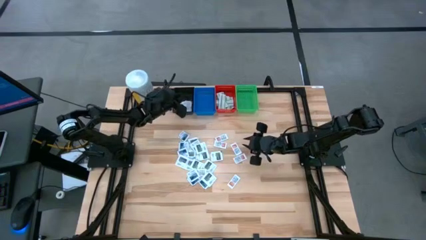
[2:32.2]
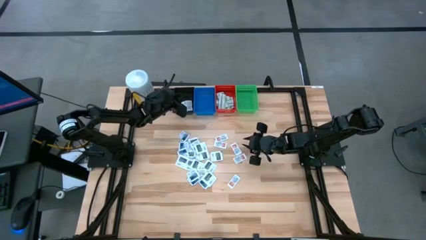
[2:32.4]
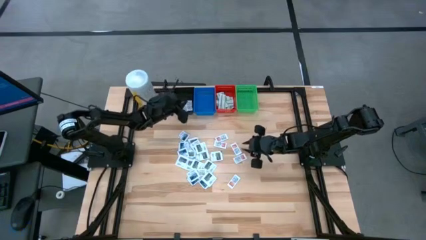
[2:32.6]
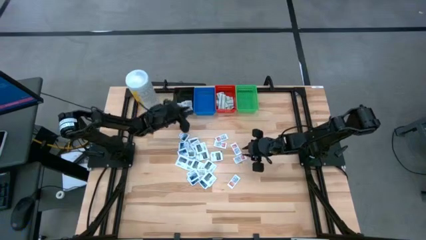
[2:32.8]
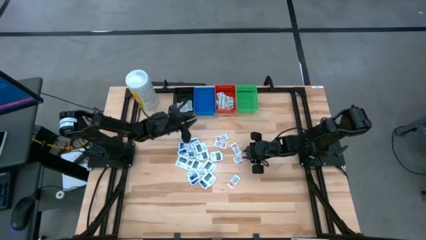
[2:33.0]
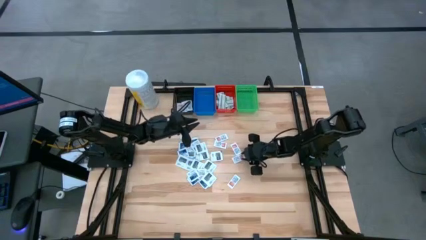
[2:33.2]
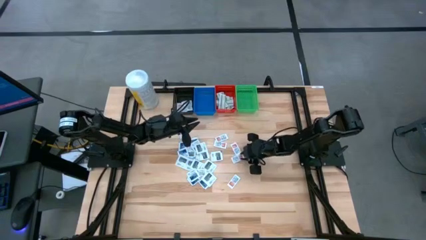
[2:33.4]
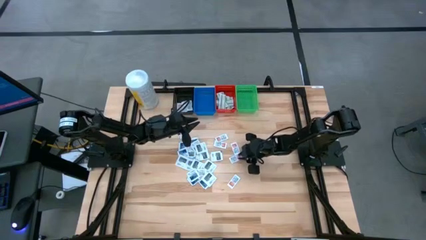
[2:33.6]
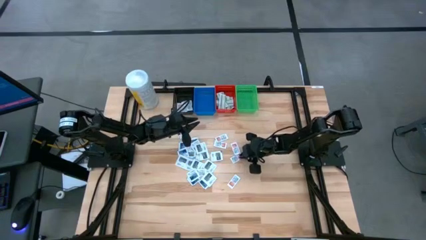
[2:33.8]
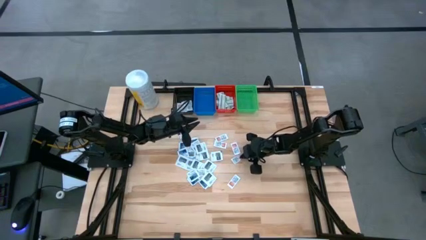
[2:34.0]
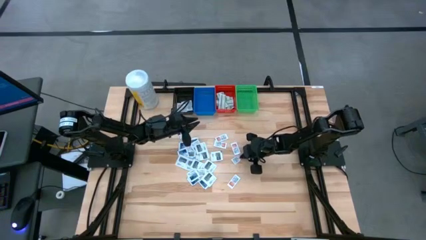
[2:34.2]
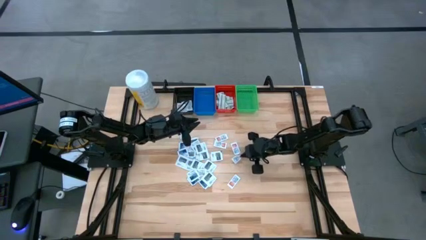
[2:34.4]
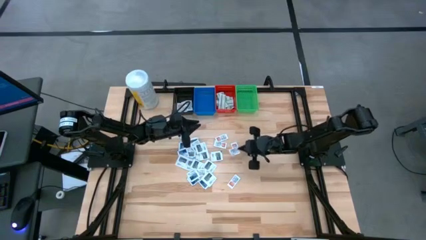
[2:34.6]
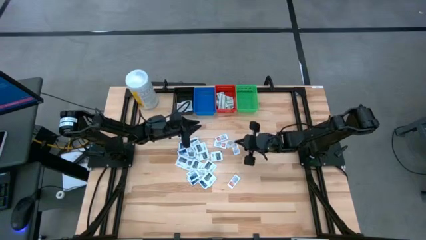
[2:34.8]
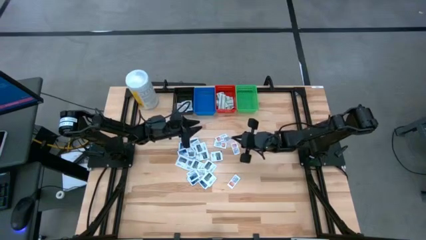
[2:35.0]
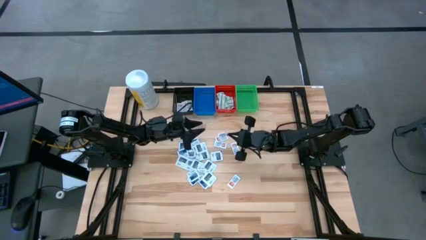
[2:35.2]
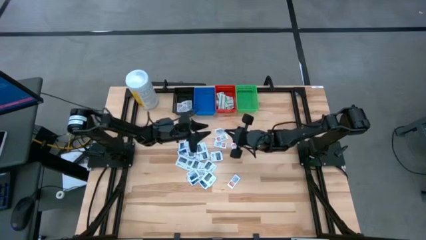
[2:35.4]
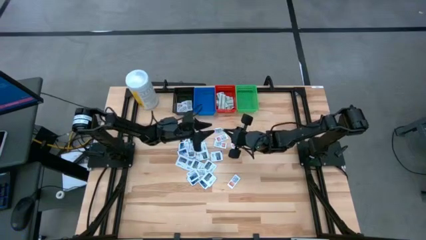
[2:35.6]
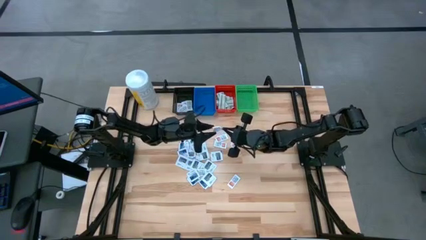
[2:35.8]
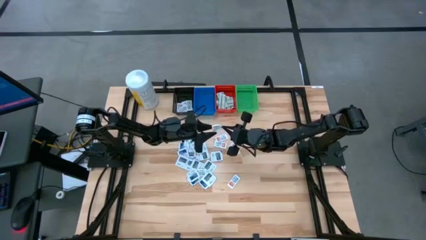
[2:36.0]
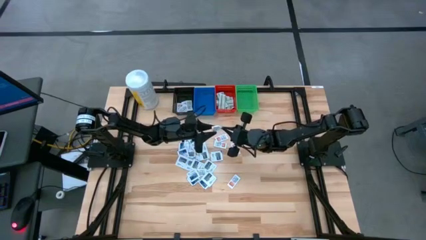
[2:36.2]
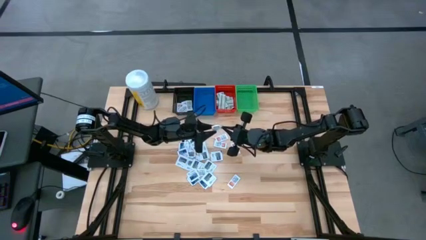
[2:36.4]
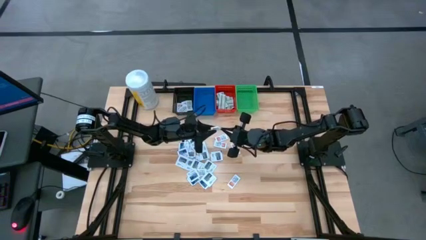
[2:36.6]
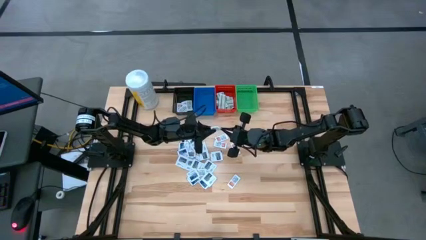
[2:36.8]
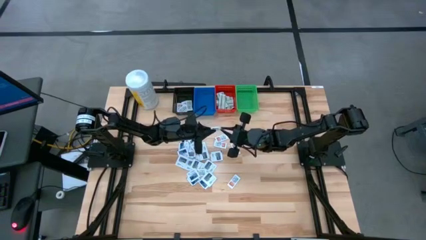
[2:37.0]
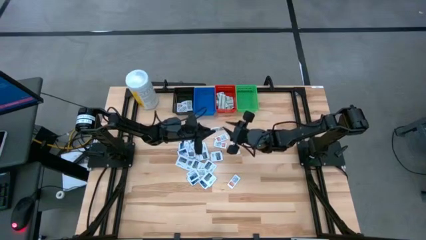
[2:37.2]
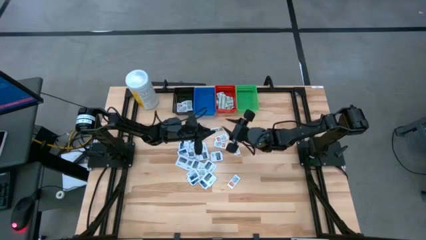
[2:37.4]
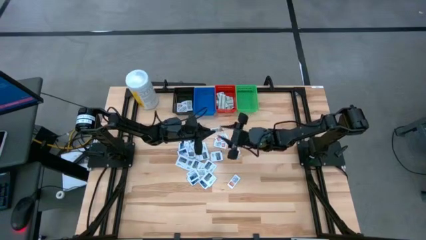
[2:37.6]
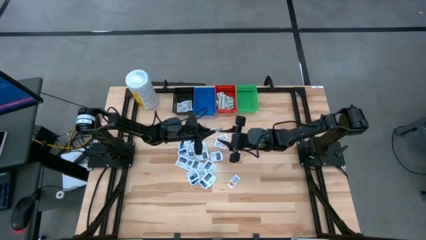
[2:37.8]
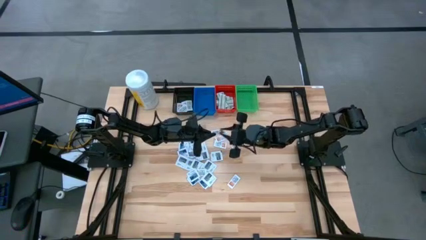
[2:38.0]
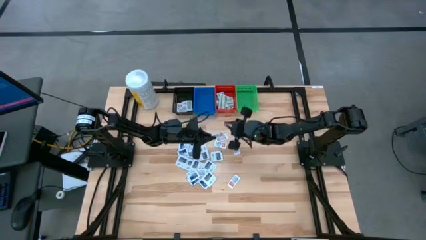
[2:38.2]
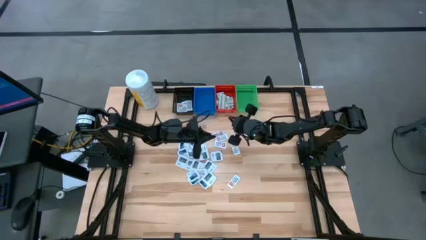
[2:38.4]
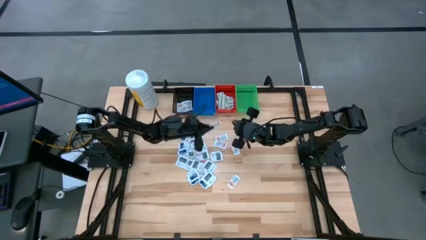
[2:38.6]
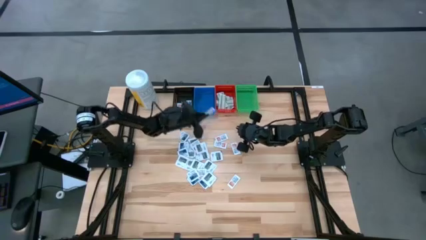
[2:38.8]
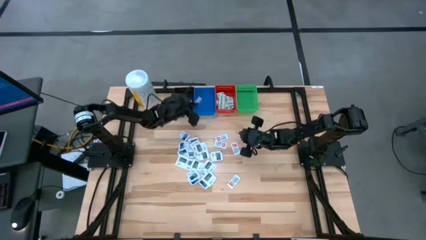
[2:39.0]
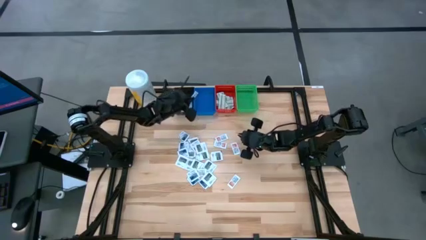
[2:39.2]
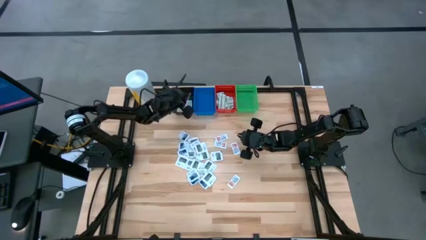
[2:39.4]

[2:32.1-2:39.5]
Task: Pick & Place First Aid Supplies
Put the orange ointment pack into the black bin

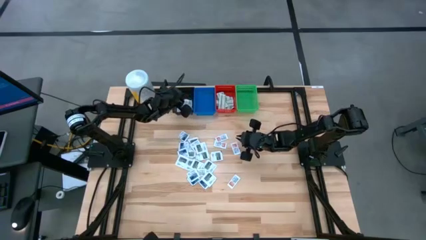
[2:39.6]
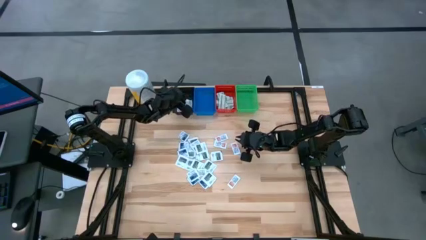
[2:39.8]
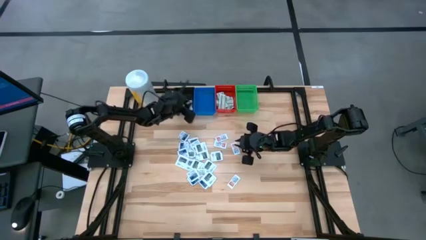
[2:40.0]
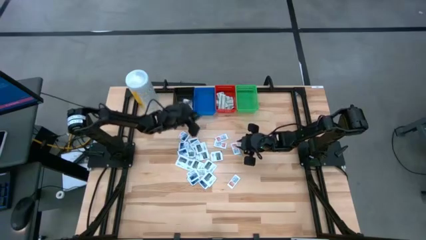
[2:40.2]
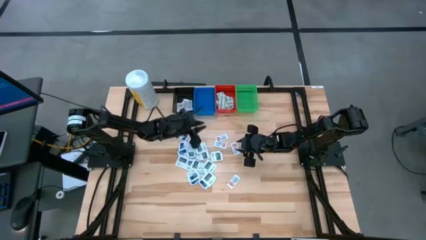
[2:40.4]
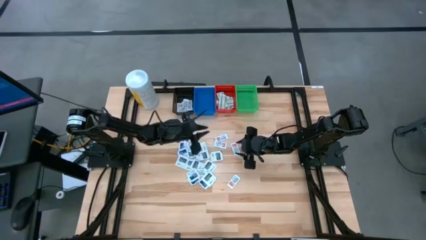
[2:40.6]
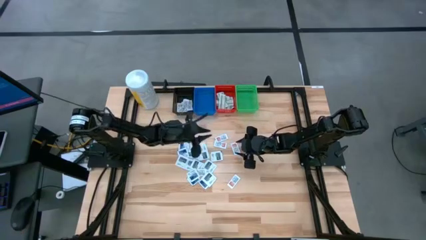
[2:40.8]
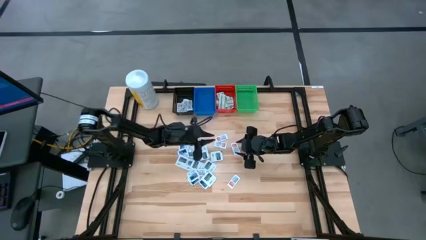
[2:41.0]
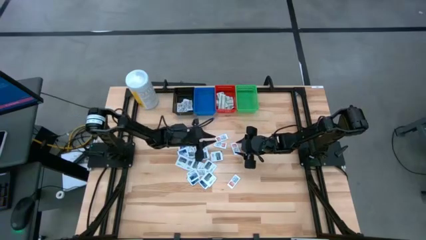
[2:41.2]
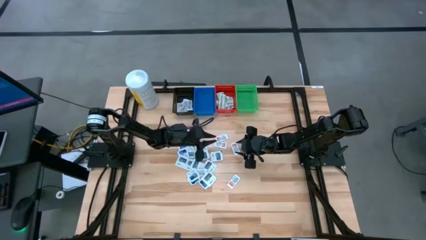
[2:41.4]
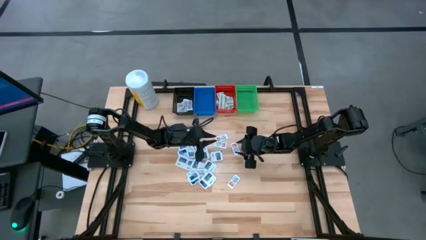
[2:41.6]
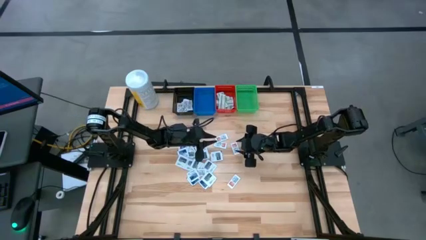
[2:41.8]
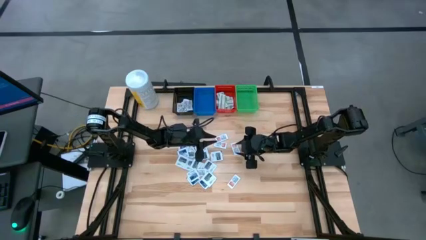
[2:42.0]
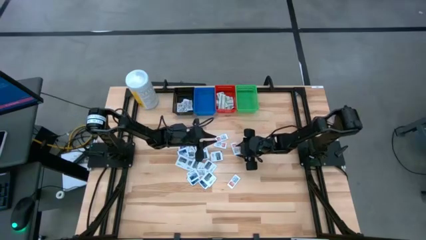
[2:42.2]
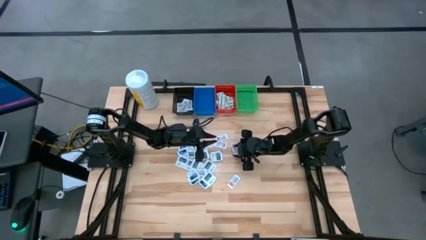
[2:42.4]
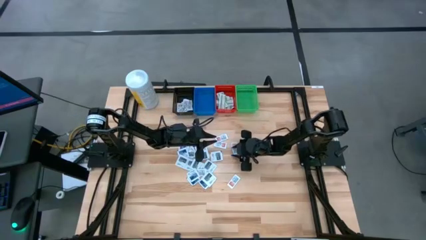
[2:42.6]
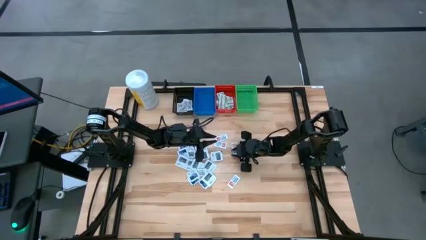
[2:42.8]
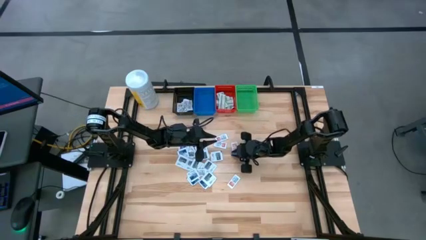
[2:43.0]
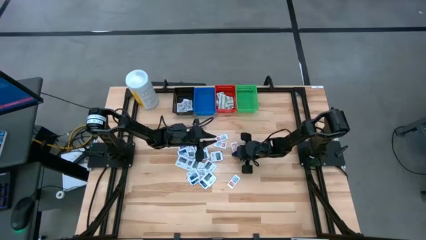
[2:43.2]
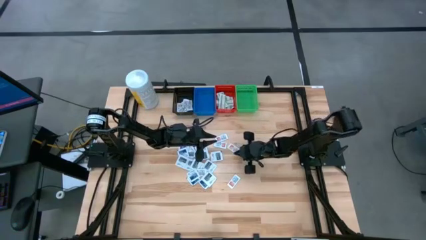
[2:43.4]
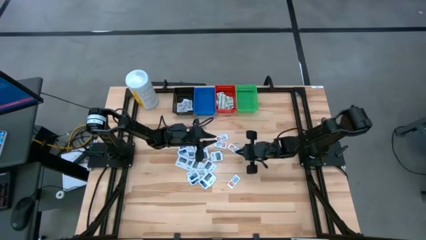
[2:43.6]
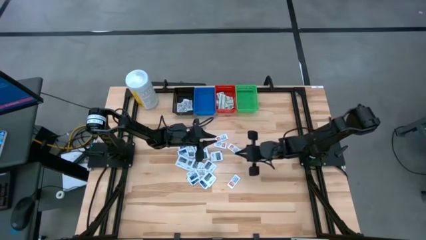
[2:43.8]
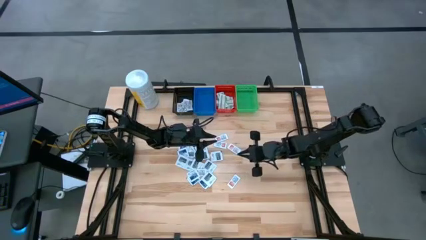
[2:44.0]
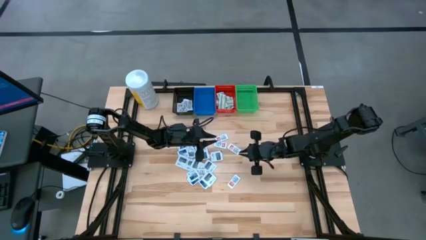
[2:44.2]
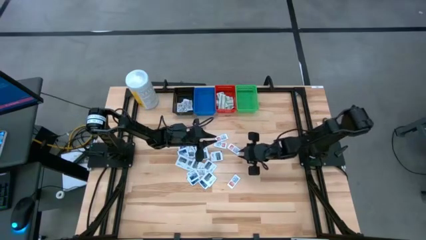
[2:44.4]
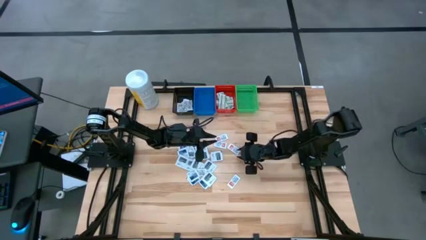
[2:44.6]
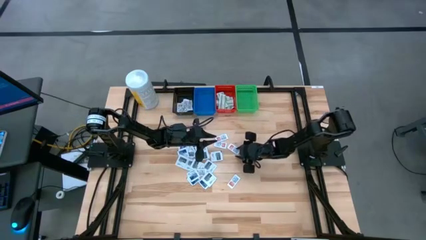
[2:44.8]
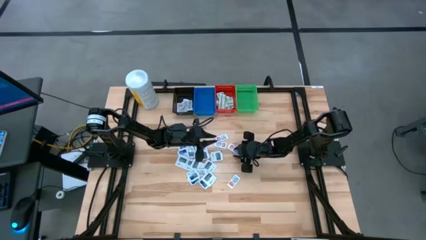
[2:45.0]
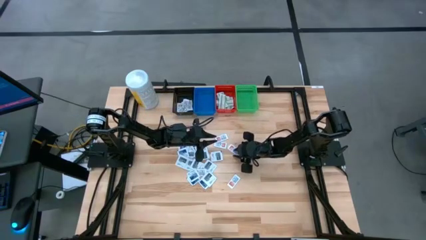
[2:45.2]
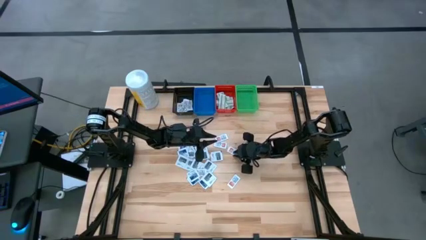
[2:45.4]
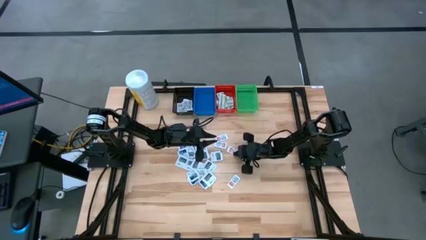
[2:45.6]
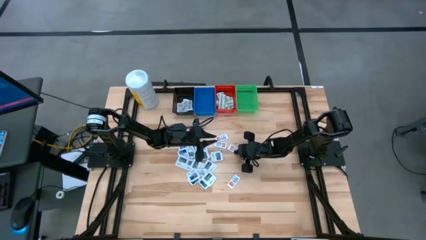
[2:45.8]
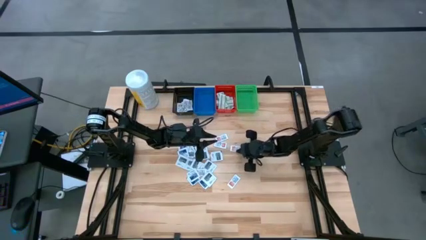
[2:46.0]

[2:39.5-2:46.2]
Put the orange ointment pack into the black bin
